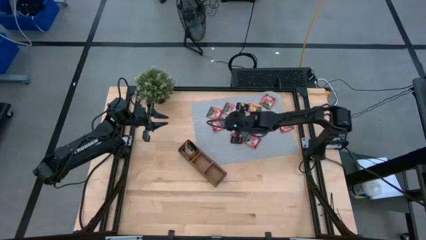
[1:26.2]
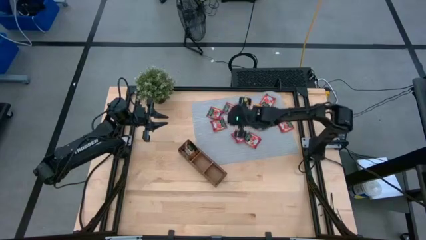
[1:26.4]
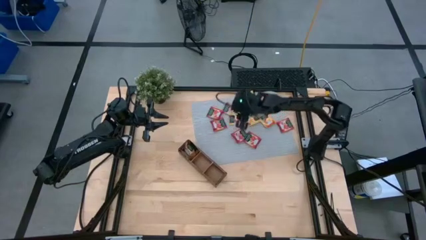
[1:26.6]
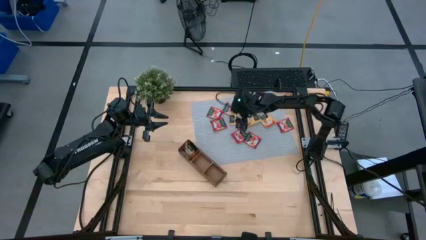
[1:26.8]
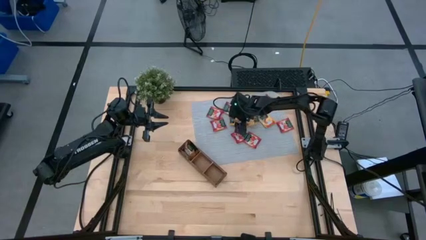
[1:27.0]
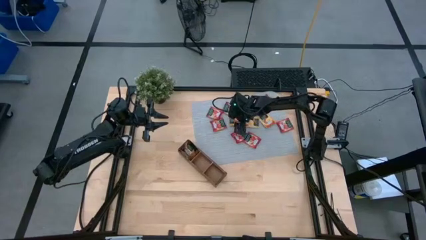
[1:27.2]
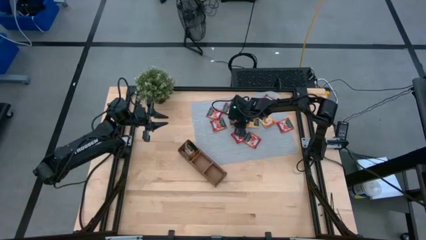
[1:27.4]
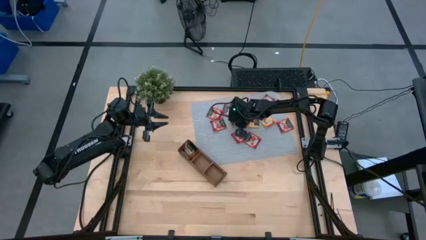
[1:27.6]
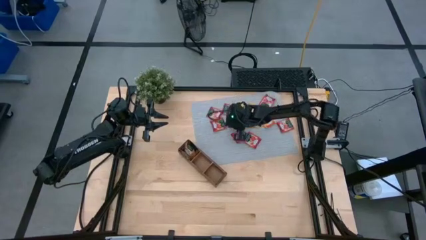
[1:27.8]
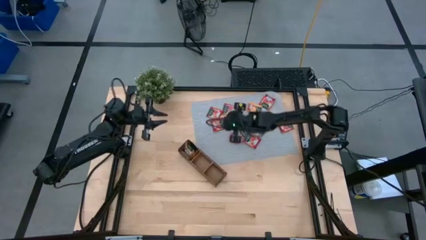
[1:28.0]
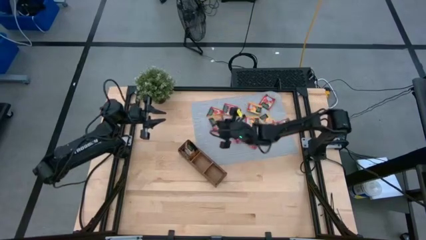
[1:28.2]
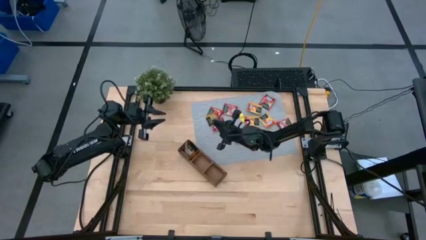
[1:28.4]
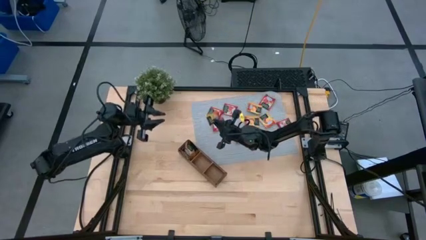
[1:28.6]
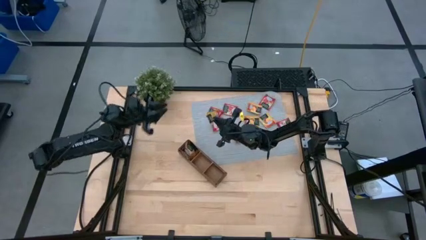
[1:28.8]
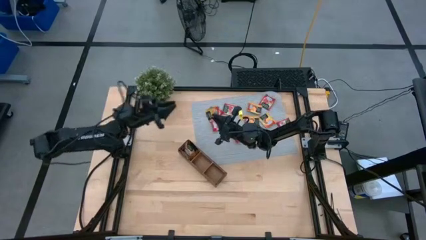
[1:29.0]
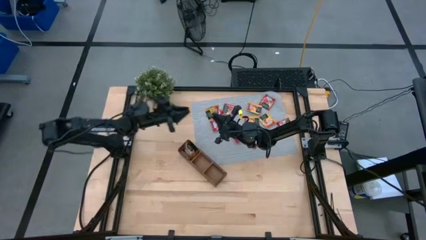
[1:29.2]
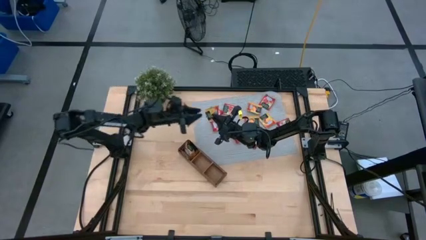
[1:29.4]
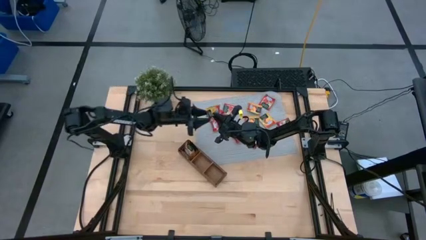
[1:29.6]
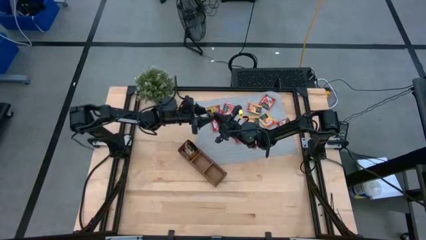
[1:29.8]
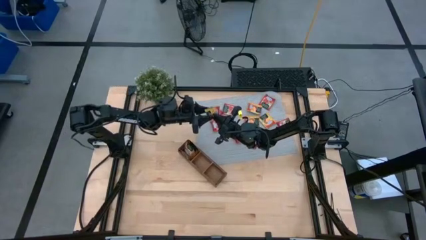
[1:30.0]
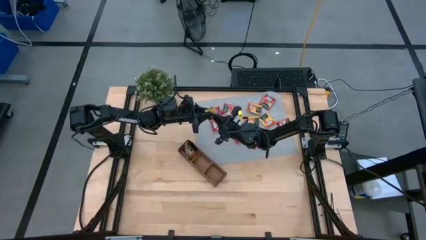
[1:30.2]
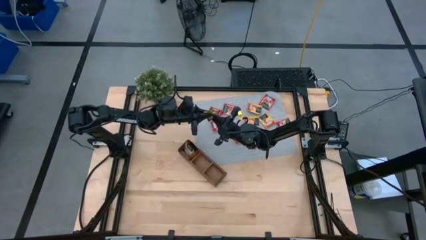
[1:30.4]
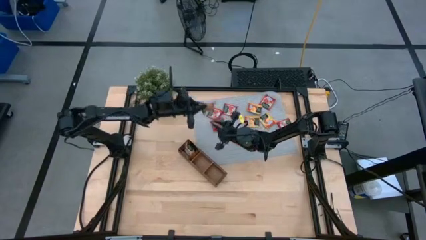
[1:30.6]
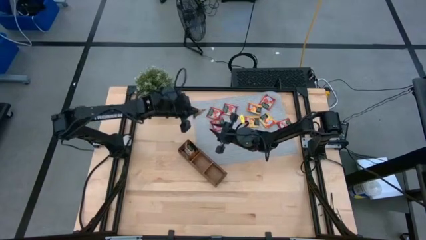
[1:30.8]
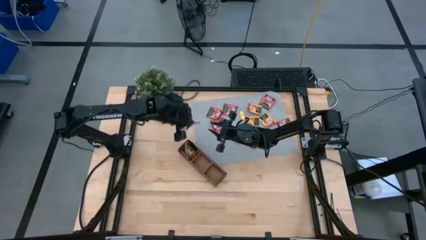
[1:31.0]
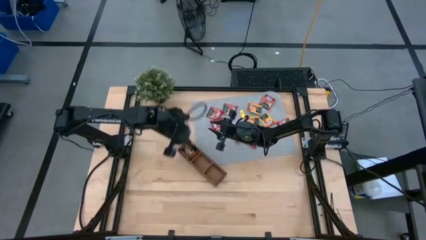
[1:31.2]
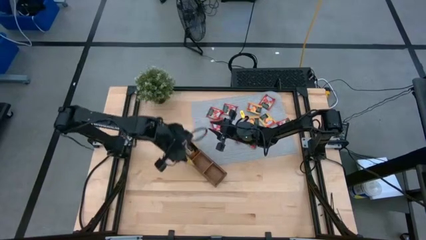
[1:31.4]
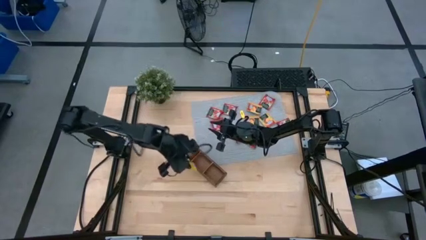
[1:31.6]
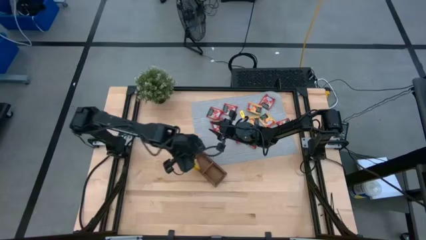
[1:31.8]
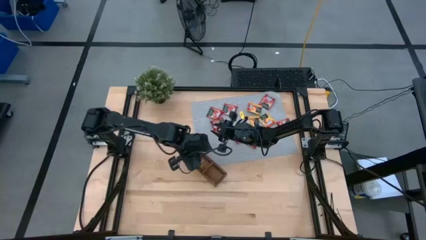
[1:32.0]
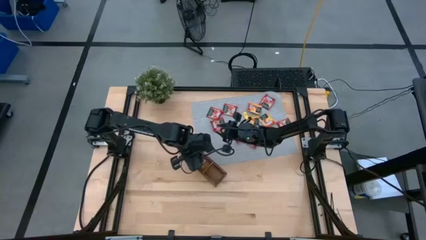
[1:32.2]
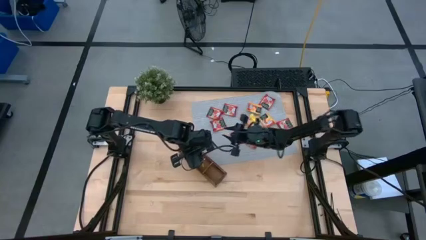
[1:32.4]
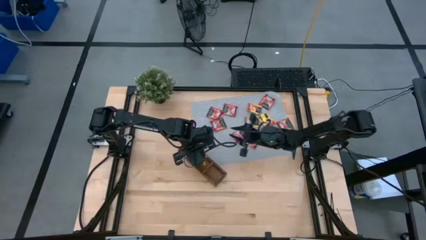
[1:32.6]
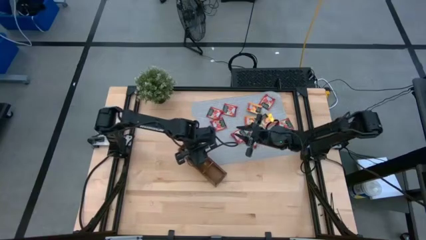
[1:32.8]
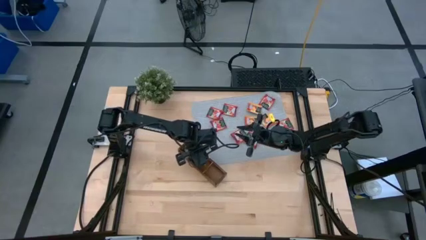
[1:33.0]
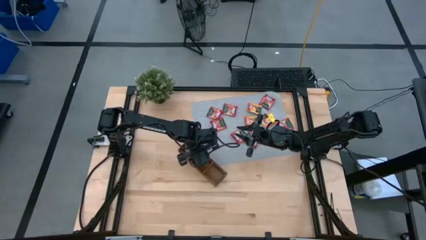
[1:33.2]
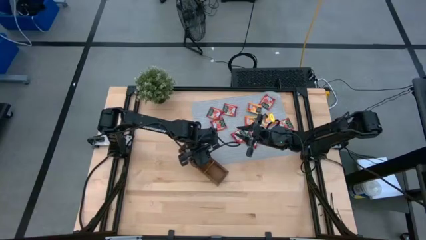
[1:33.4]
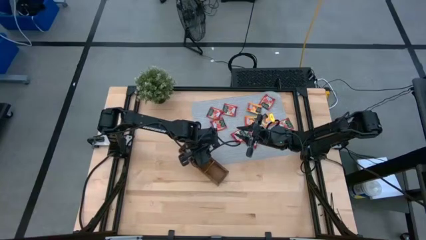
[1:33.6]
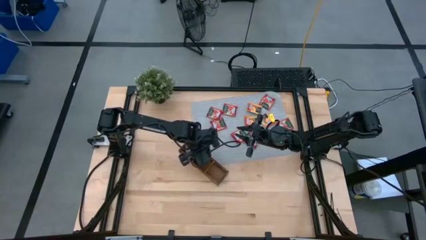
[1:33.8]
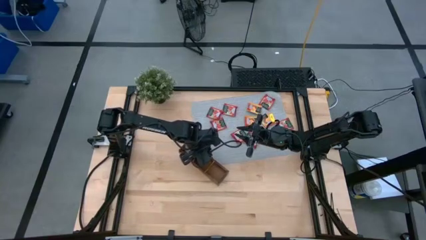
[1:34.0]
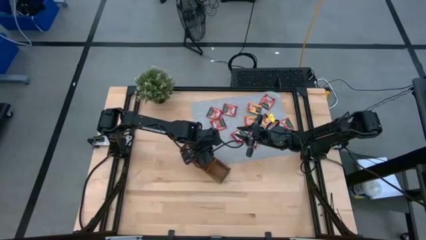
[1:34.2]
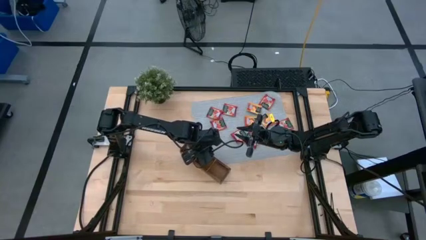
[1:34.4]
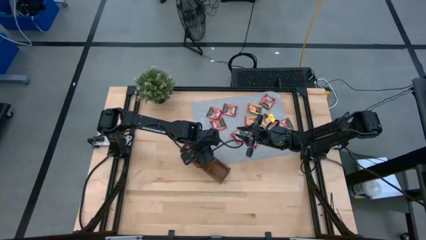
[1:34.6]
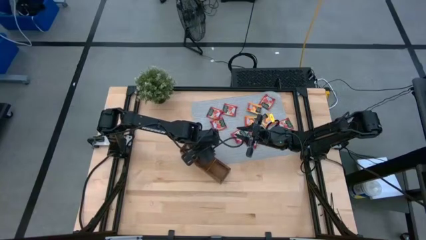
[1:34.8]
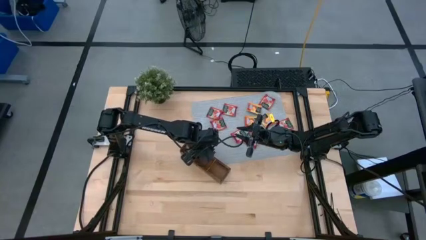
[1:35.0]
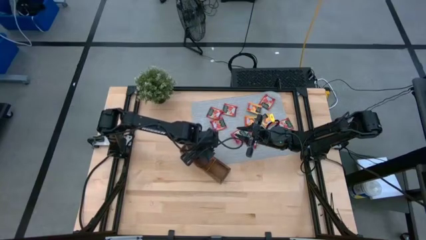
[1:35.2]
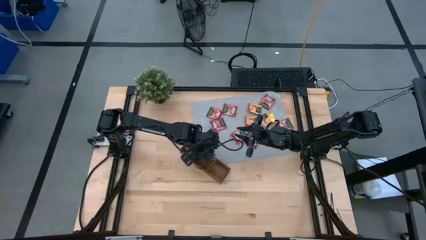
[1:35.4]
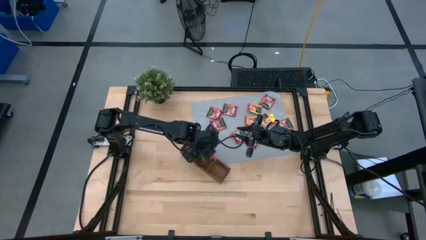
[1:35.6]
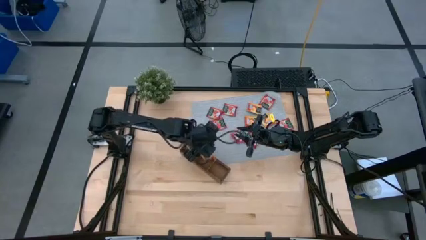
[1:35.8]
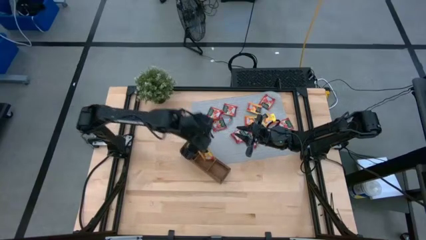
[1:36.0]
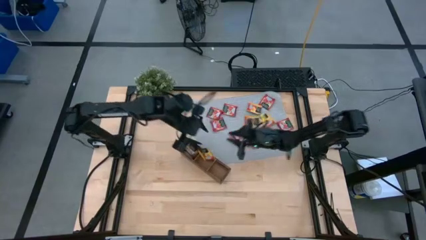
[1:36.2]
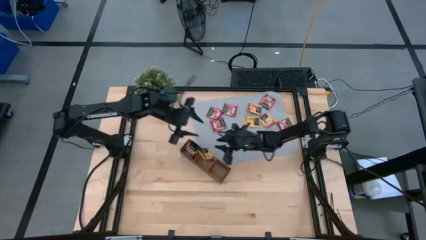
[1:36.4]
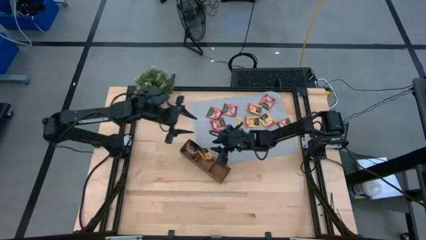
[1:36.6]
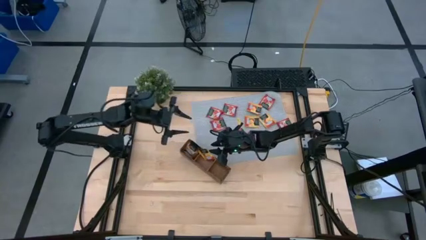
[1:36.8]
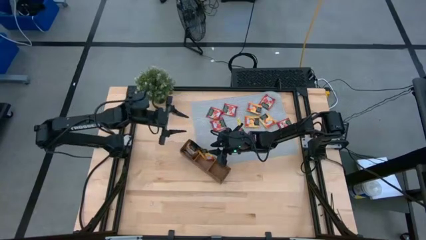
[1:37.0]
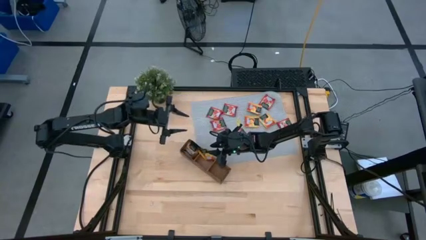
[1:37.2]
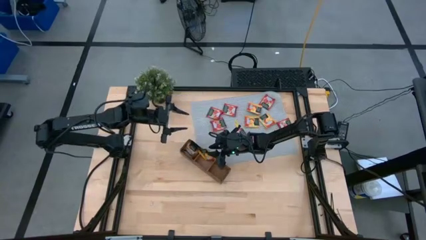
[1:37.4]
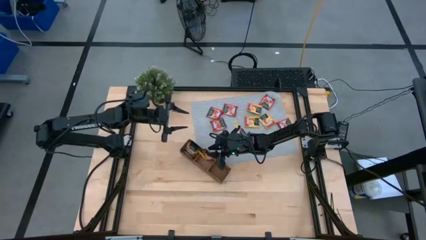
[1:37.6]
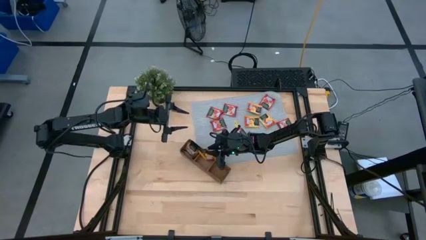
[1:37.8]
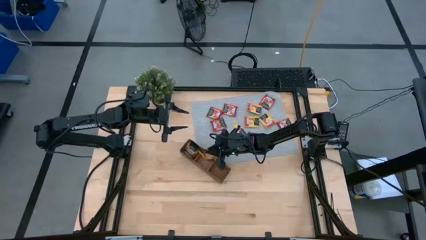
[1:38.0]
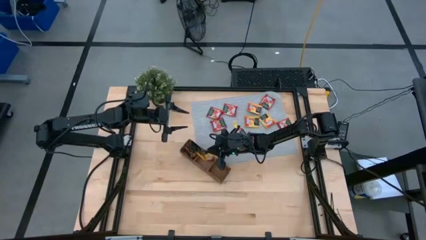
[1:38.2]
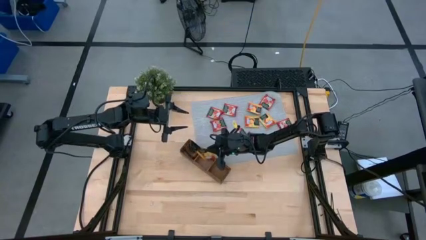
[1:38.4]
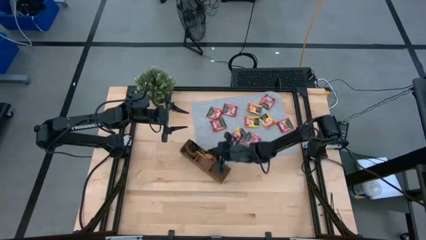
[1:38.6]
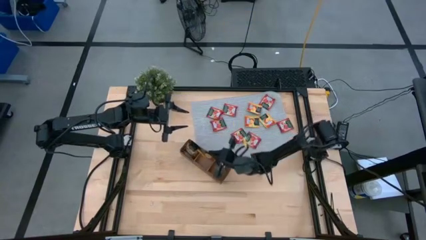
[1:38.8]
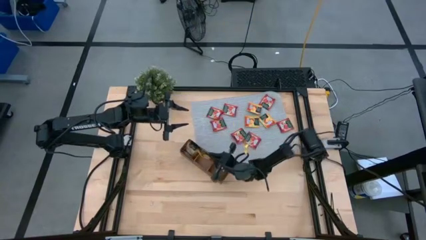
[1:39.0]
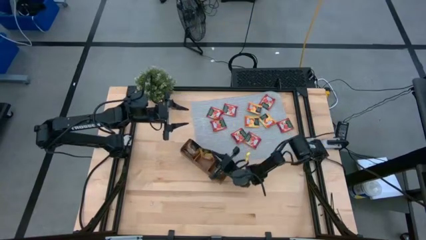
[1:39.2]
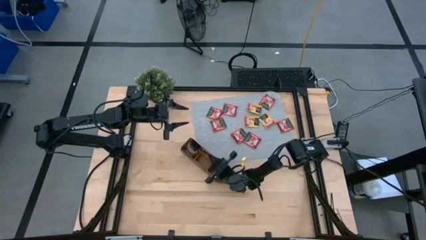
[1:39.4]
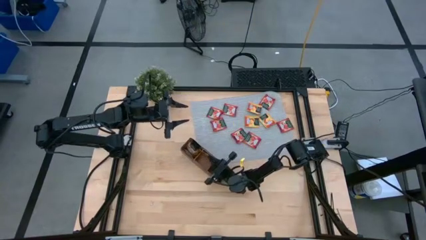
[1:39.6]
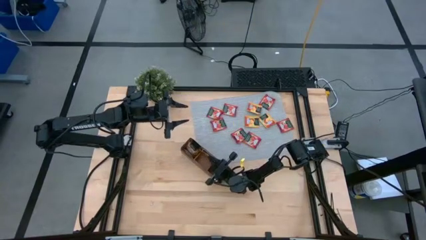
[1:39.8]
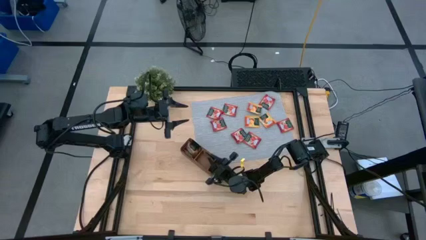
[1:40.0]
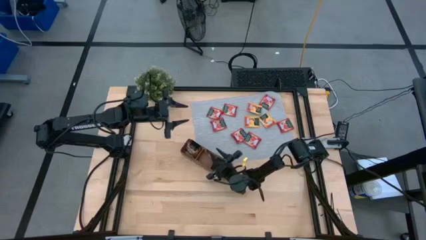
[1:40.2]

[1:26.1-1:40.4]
Task: Pick & Place Tea
Put the yellow tea bag into the middle section of the wooden organizer
